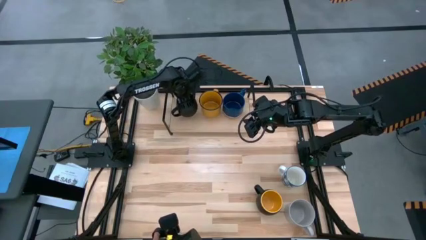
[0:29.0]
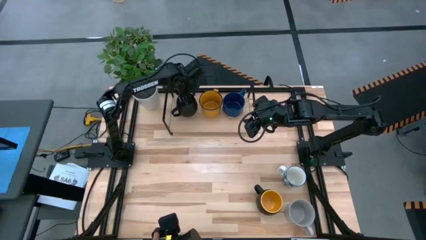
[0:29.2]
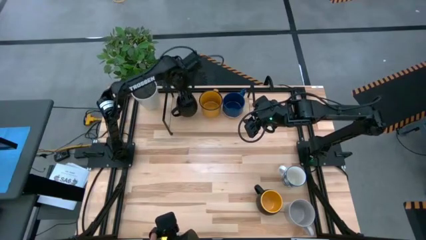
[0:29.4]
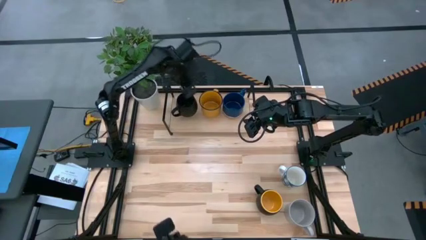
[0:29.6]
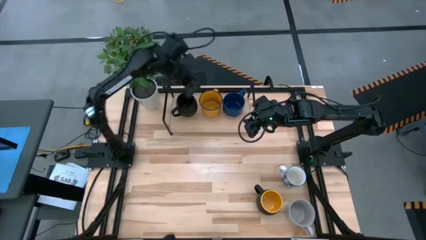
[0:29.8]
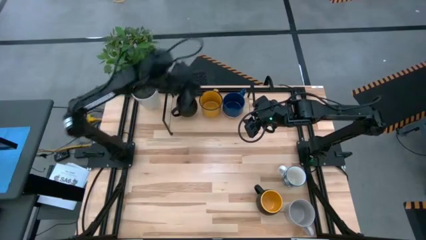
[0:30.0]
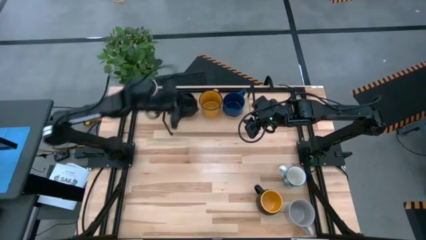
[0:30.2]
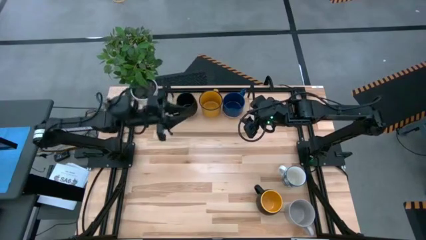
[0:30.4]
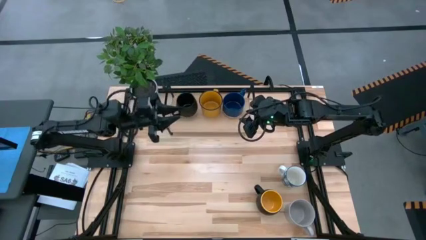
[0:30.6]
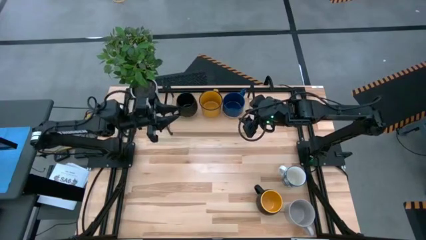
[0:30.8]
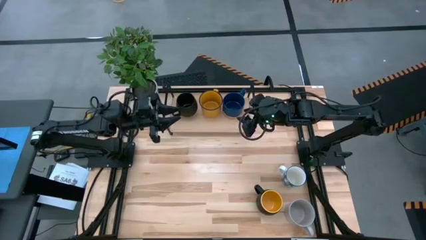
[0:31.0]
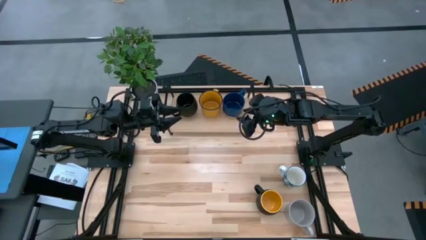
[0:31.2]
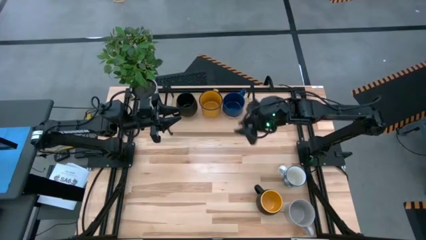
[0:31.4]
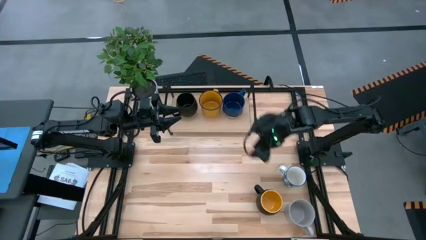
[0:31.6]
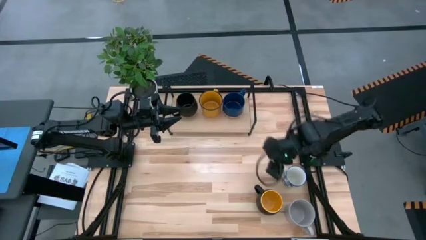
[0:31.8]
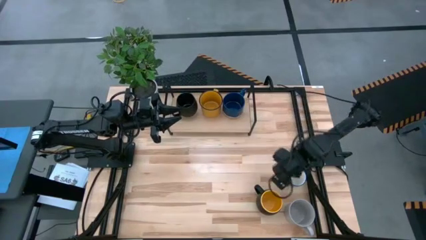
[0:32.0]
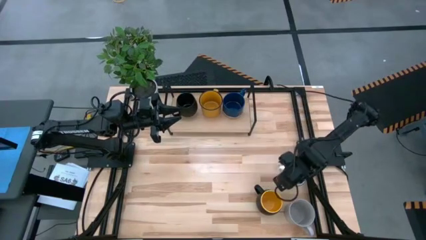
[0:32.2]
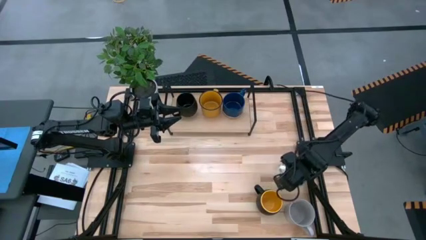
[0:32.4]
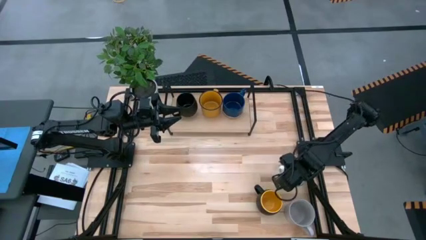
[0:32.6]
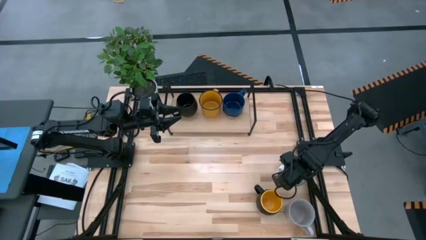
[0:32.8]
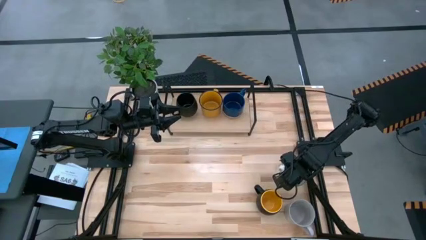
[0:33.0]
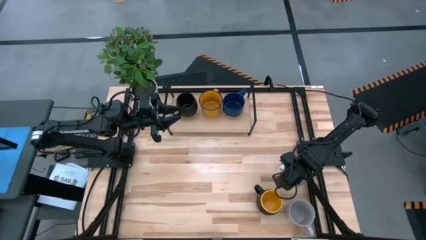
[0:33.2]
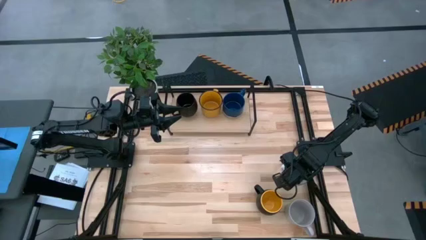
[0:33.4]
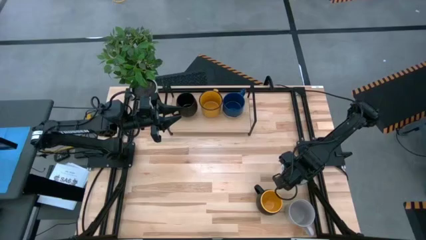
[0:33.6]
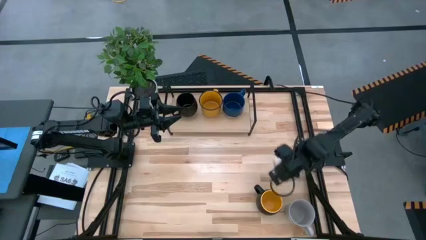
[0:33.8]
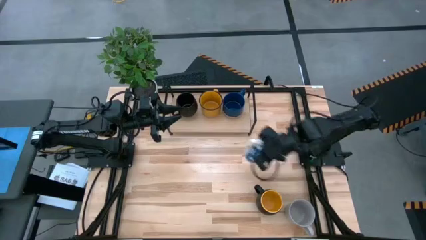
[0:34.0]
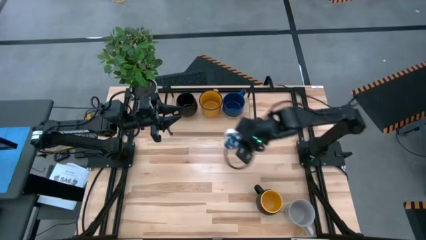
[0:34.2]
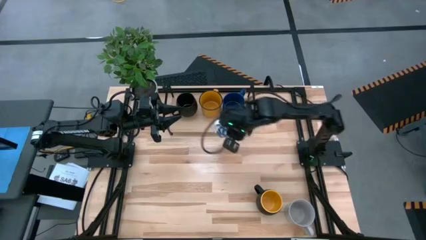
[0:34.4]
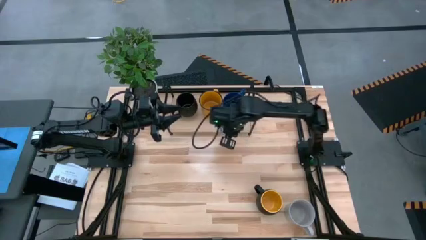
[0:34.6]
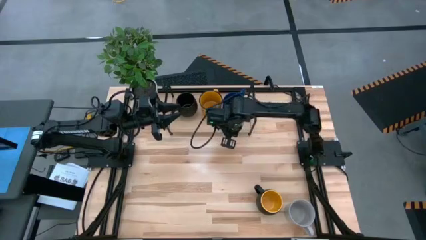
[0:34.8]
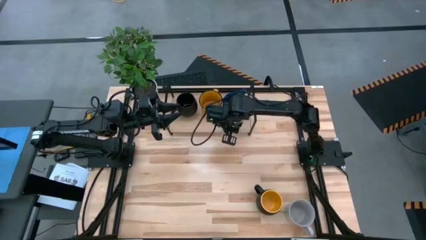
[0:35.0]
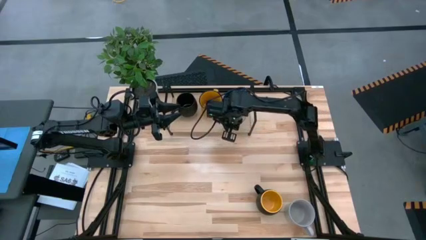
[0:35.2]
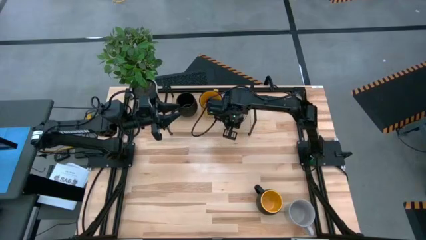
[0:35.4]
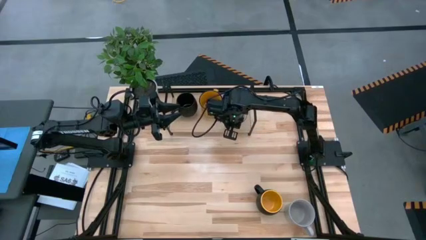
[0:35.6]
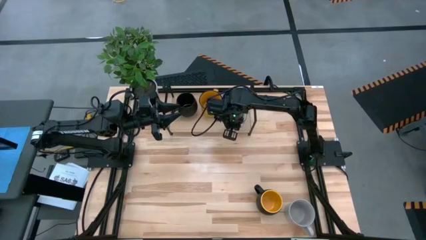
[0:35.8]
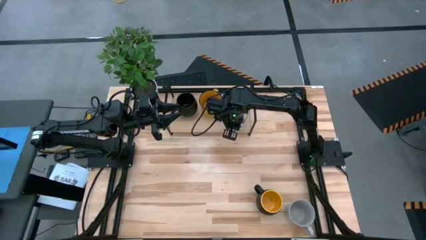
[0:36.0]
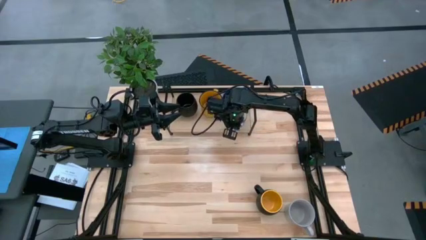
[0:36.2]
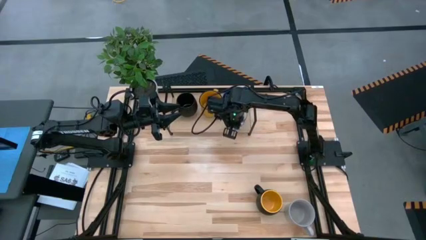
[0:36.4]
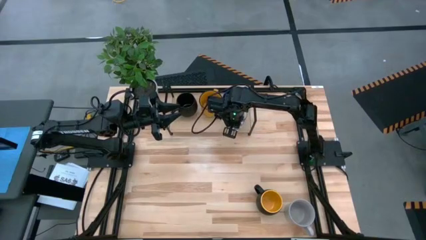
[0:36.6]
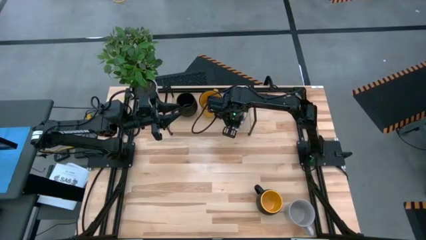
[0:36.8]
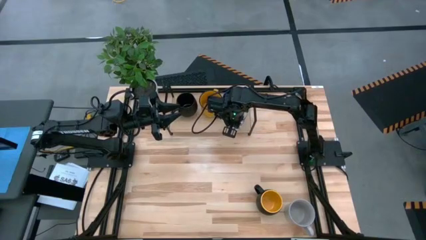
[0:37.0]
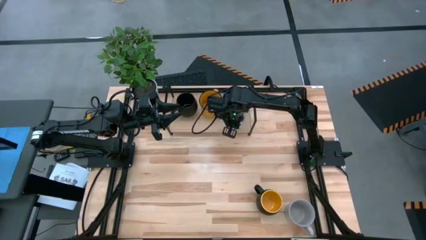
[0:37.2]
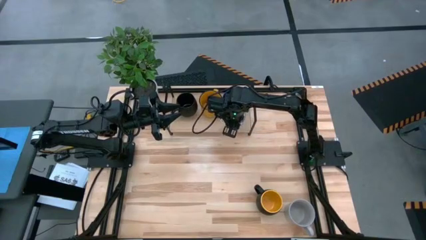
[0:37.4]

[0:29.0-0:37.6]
Task: Place coffee mugs
Put the white patterned mug on the shelf

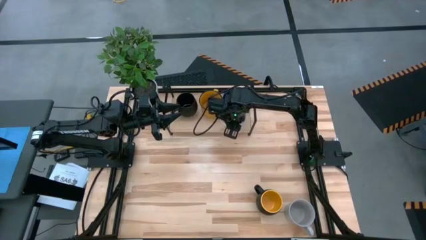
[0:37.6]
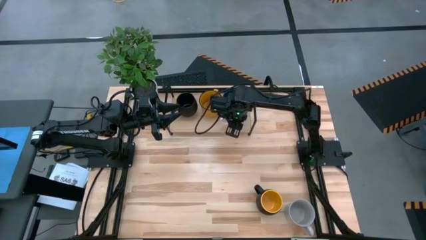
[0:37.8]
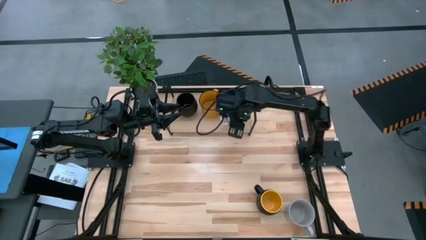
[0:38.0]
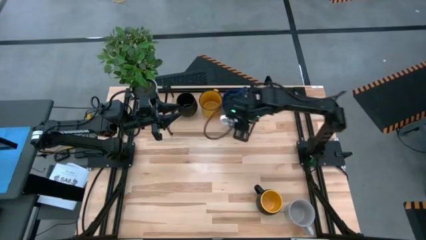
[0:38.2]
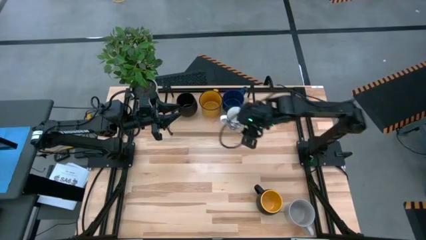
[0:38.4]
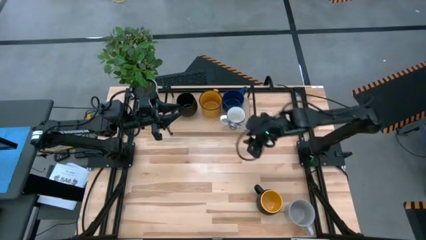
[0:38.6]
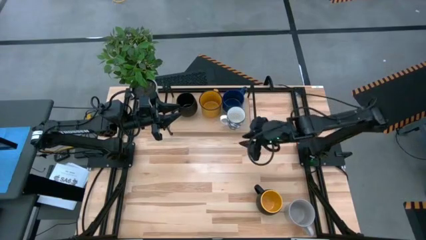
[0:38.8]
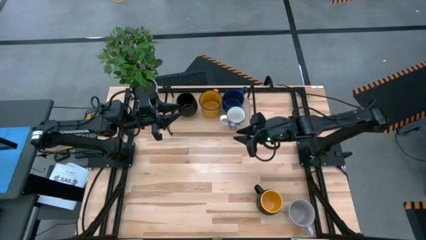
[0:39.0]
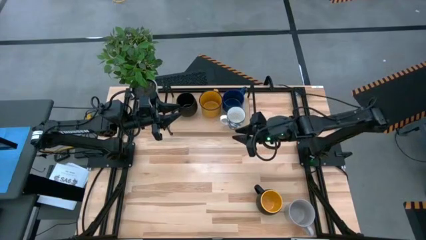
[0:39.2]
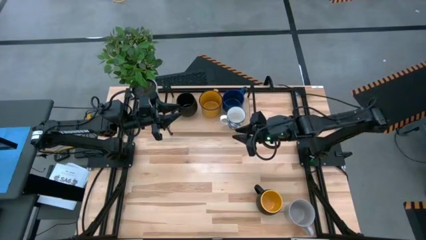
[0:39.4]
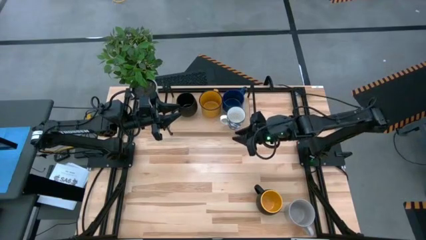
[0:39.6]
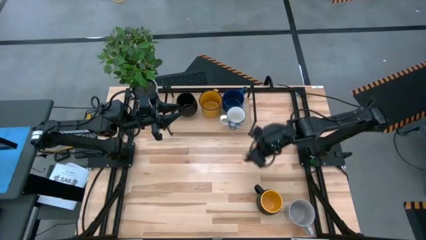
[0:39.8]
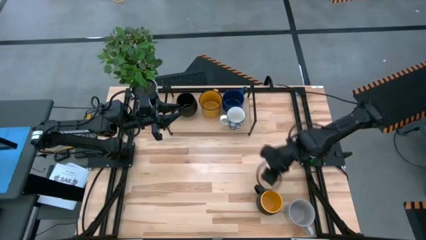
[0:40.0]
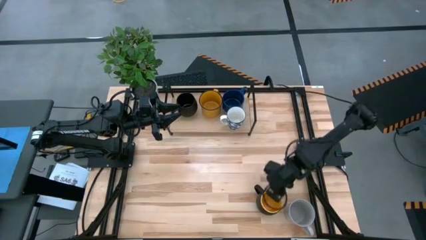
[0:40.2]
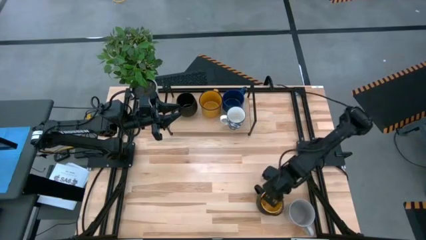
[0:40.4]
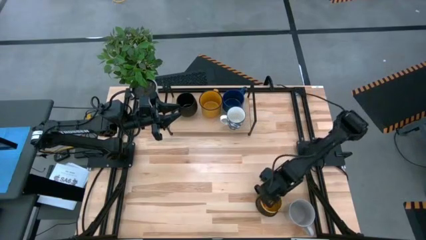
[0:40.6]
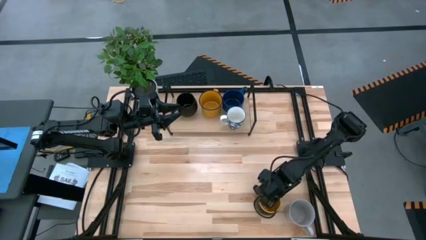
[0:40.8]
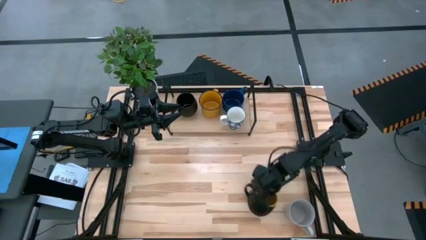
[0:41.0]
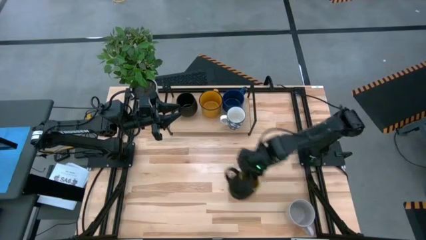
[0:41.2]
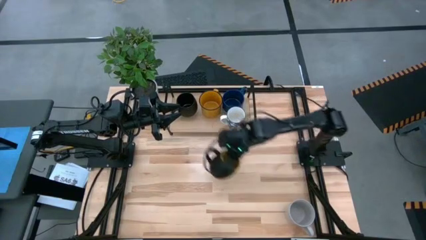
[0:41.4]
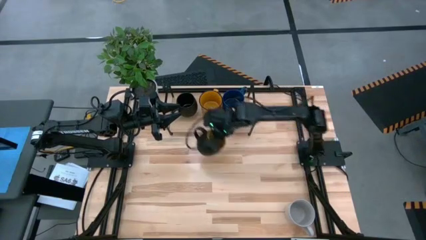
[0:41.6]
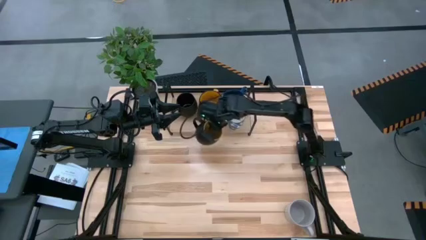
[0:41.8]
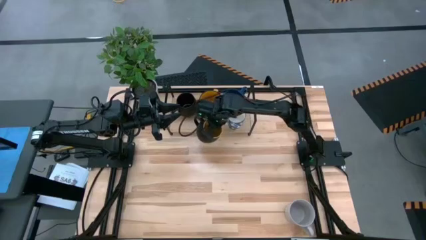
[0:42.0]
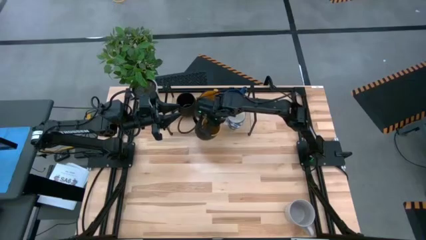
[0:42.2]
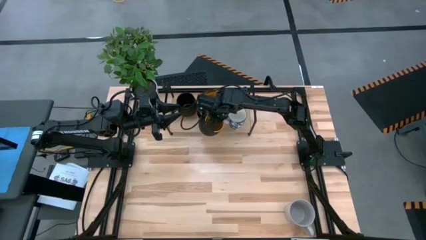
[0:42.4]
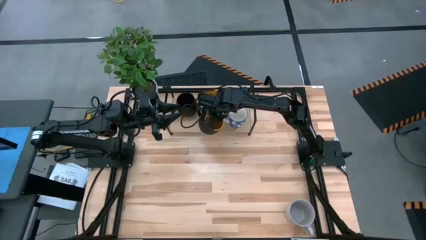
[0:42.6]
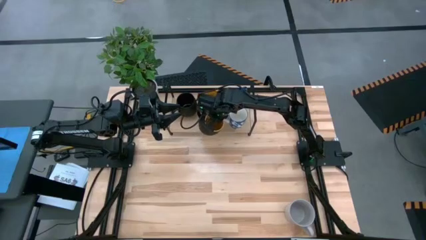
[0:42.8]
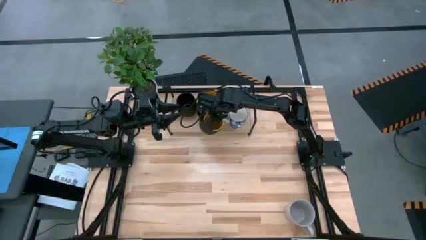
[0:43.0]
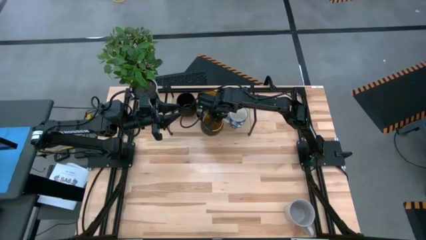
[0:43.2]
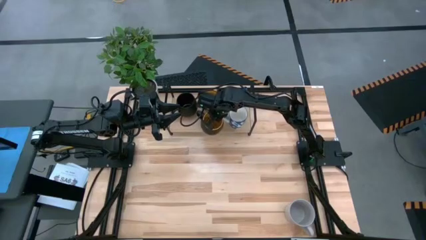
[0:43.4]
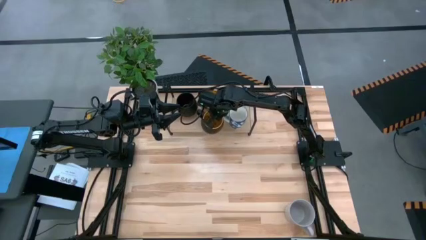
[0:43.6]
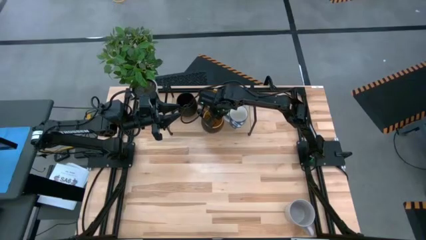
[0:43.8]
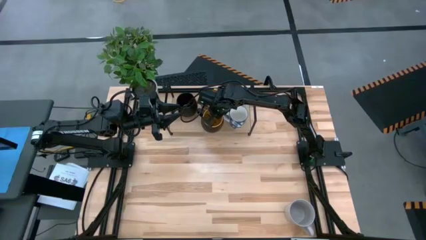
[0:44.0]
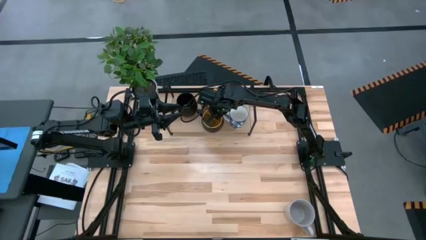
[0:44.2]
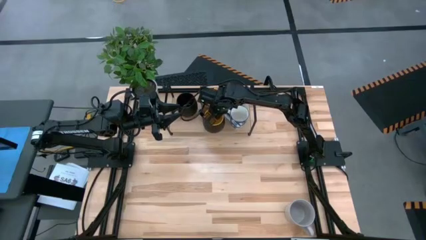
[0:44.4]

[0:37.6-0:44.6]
Put the black-yellow mug on the shelf
